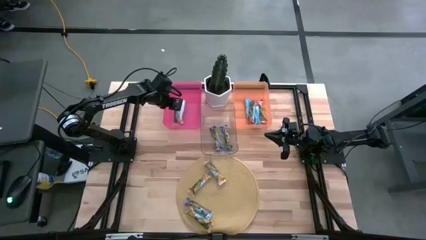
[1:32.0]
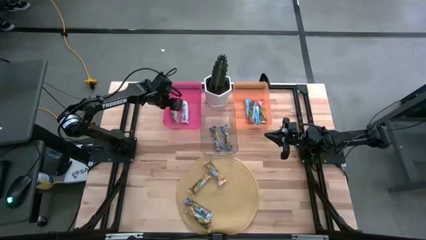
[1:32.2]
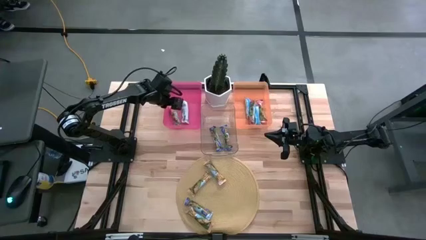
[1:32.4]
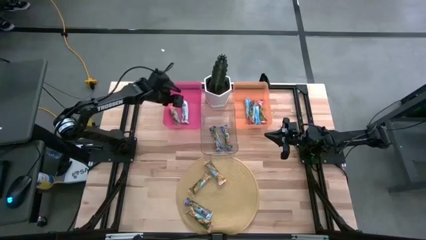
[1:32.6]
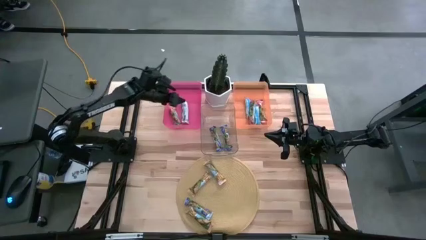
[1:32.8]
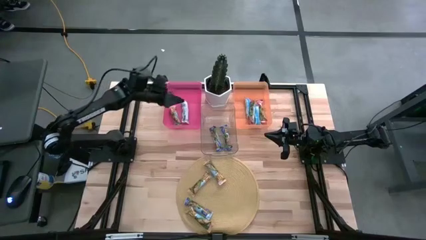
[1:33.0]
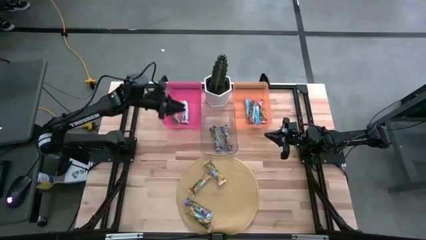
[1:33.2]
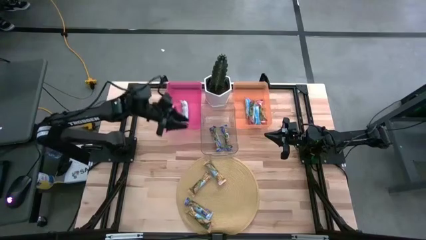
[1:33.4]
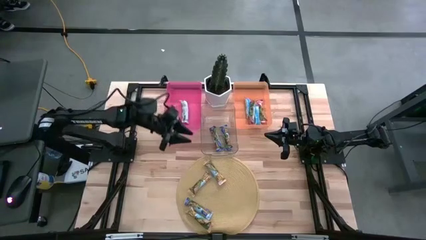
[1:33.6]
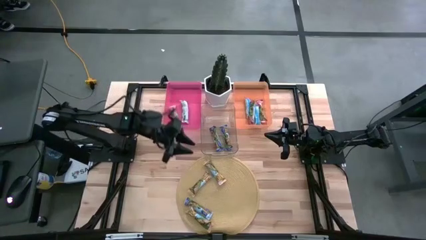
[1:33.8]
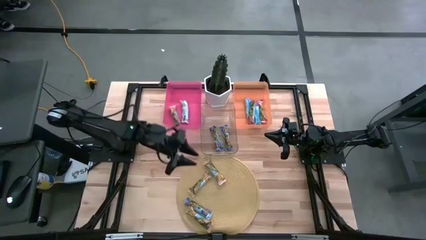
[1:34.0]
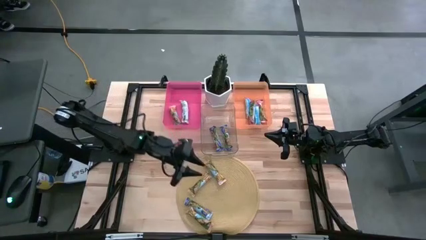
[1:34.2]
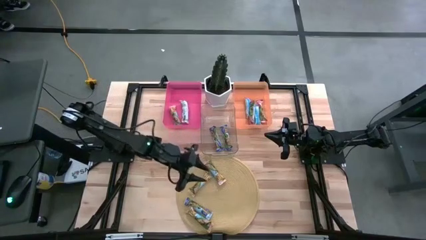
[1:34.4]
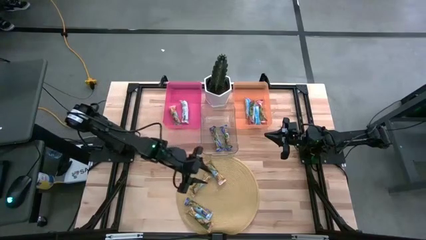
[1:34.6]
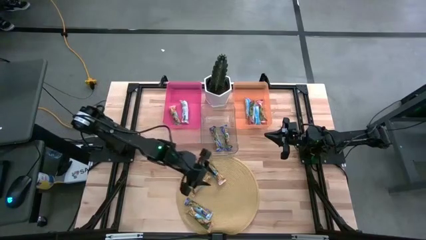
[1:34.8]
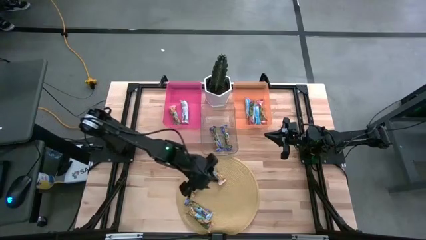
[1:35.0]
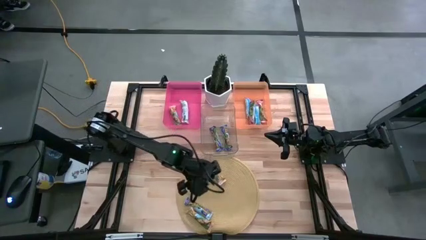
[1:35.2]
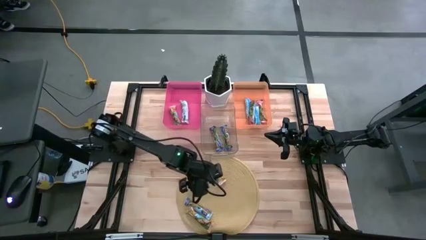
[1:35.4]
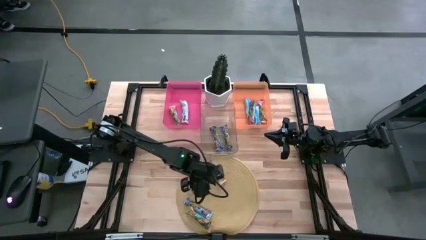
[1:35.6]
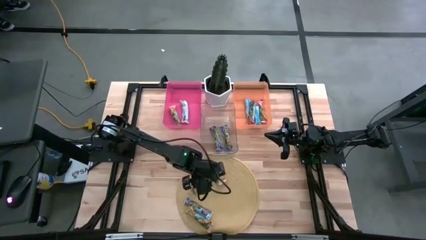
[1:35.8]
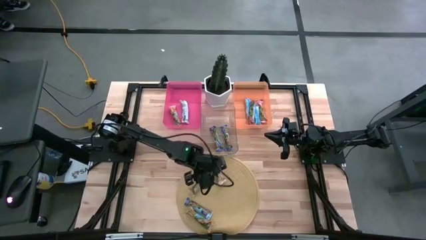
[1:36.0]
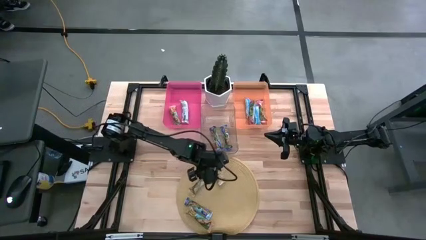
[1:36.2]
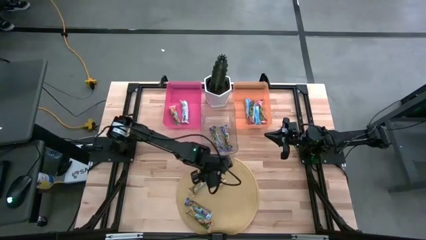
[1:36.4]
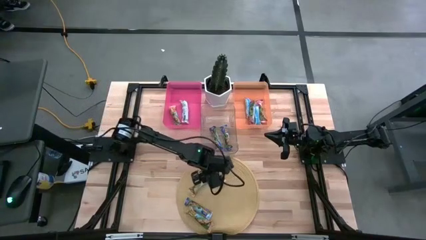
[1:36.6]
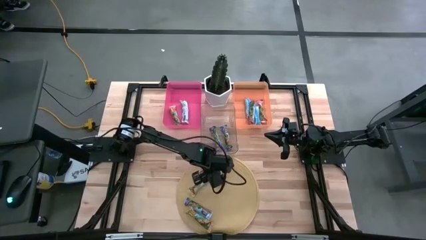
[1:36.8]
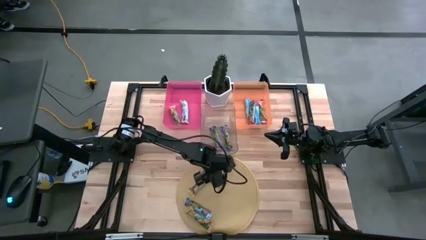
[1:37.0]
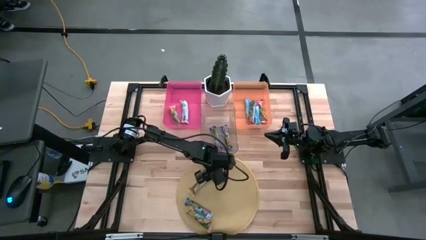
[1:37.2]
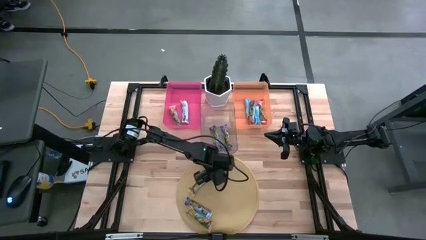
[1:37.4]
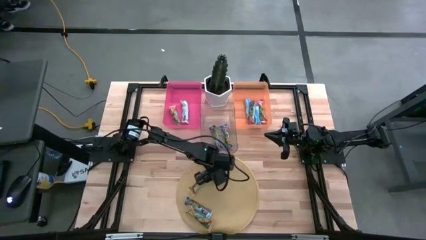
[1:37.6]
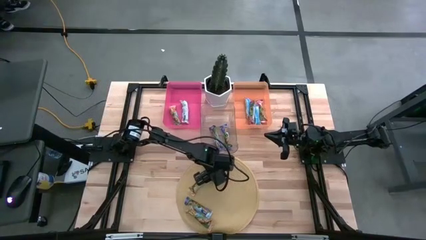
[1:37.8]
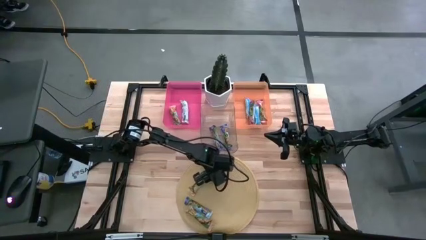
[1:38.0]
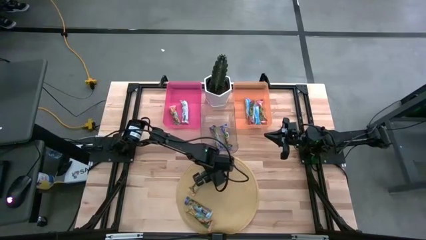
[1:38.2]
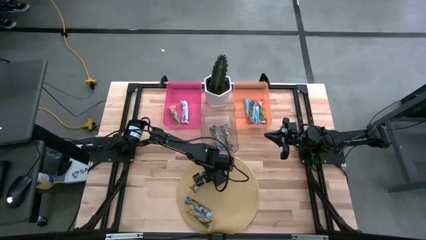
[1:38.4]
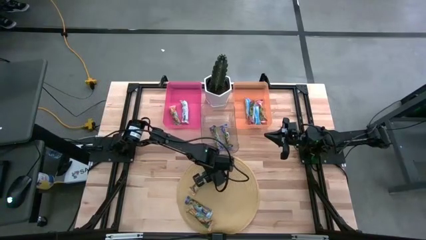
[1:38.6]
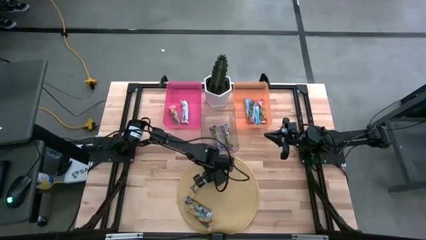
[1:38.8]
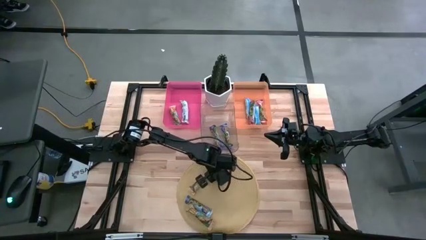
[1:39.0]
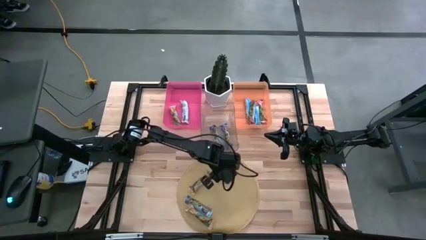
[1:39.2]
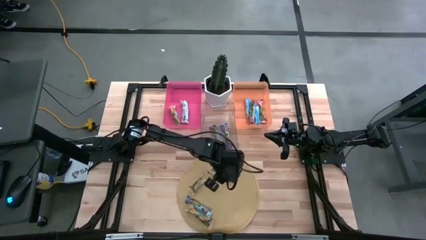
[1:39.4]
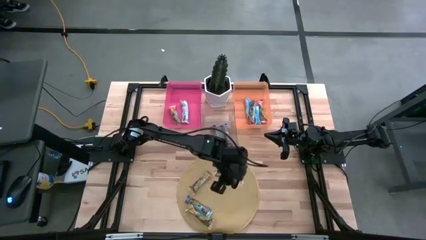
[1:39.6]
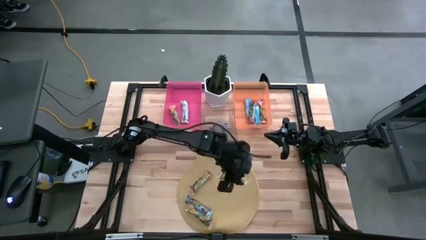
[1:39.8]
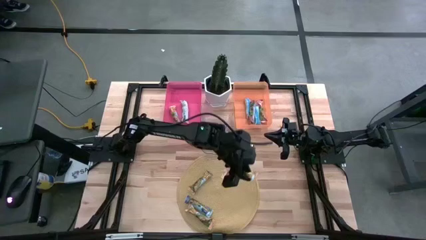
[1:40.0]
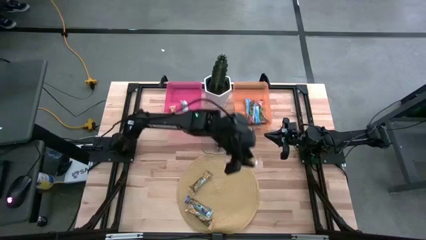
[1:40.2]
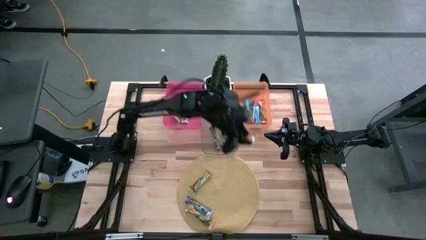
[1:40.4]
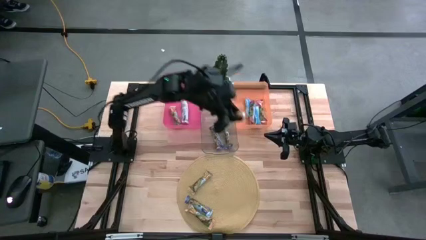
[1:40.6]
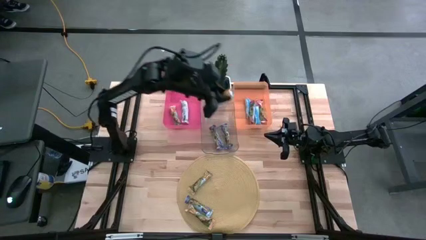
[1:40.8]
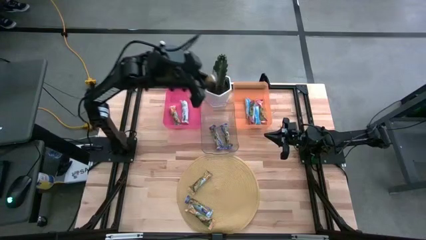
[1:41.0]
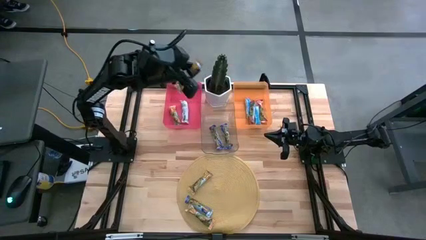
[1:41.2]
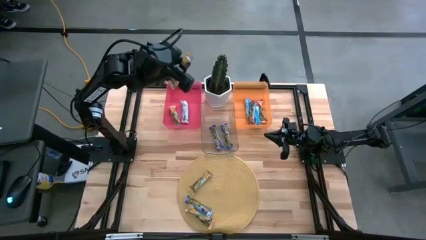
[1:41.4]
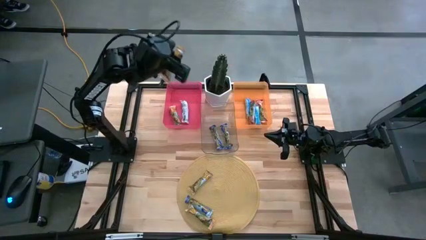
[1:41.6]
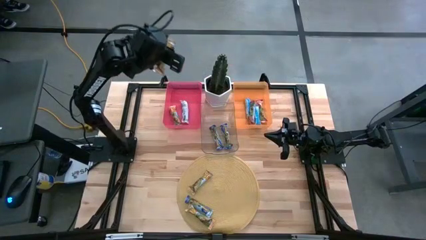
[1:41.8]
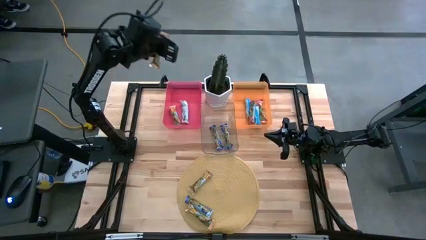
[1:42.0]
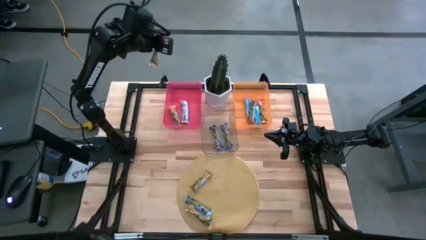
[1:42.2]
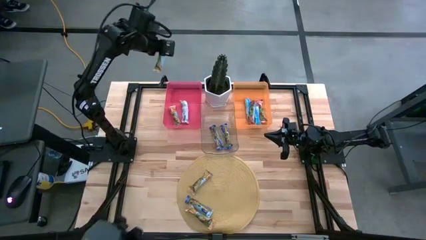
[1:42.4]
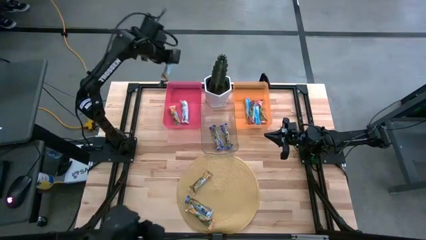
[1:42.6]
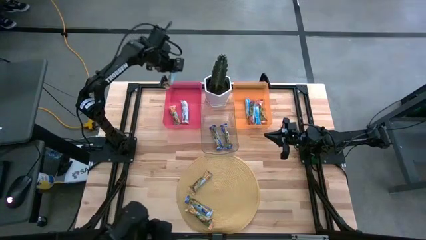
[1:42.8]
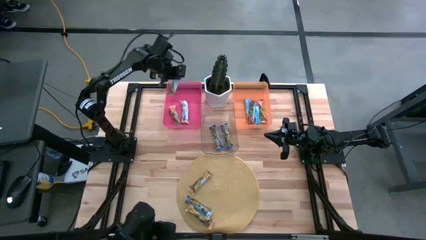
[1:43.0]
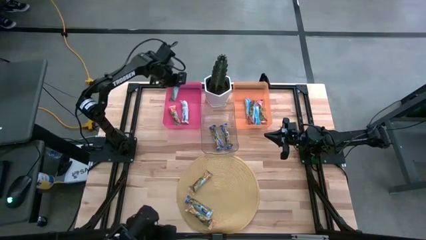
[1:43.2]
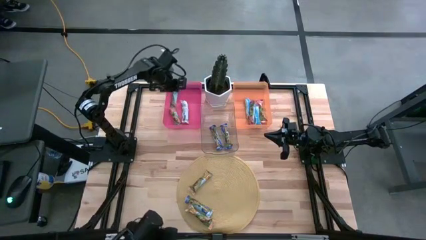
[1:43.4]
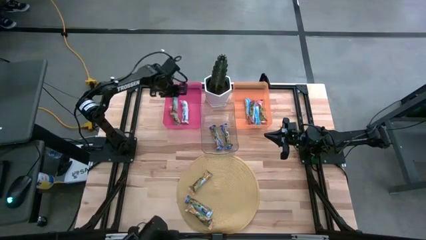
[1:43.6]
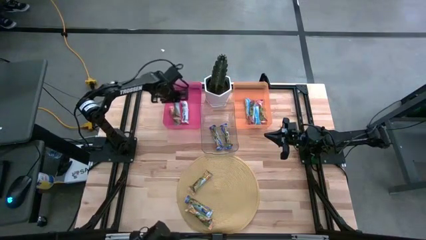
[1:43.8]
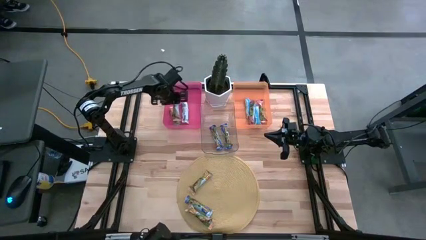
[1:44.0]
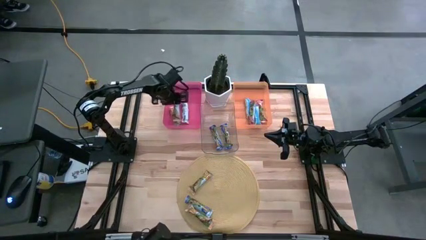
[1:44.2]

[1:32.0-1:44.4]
Task: Pick and place Granola Bars by type
Put the yellow granola bar into the pink bin

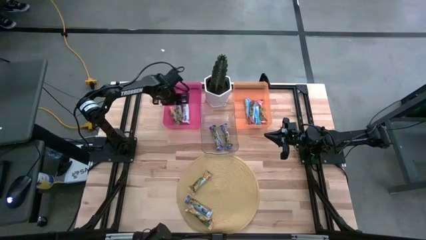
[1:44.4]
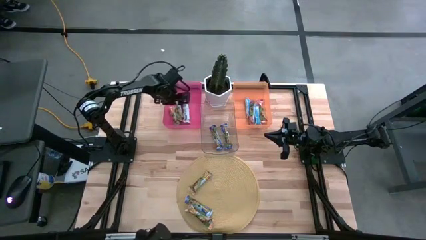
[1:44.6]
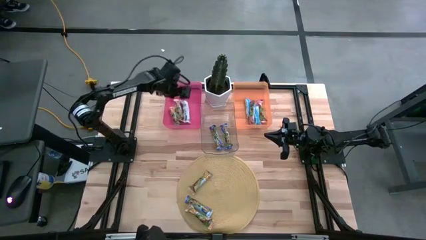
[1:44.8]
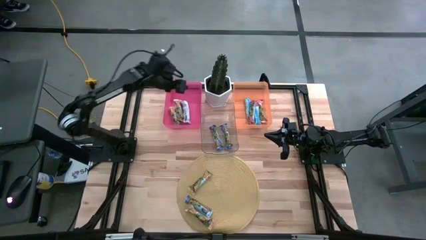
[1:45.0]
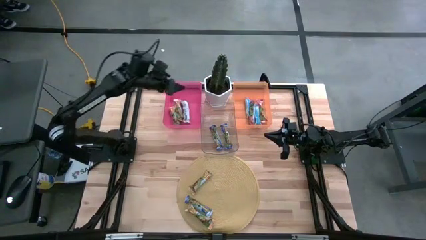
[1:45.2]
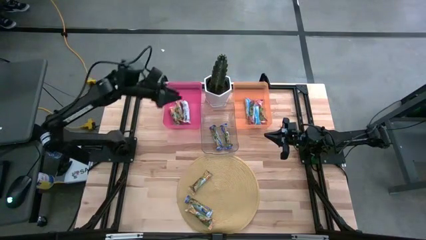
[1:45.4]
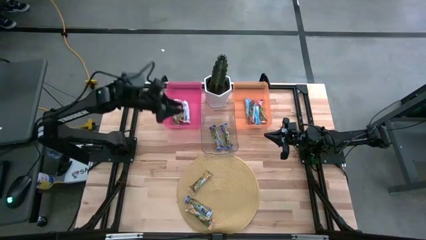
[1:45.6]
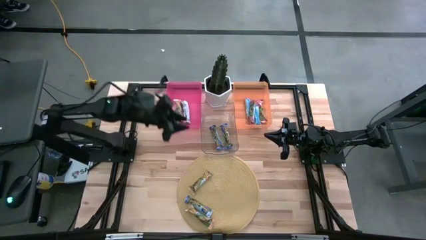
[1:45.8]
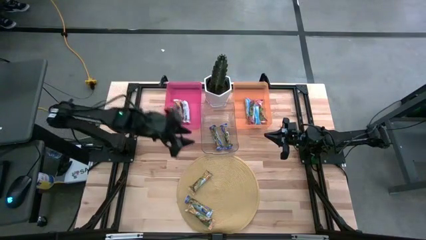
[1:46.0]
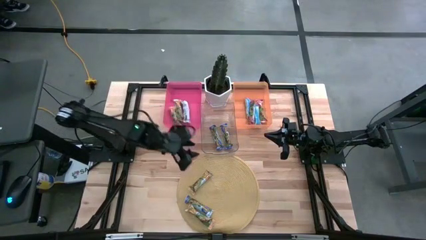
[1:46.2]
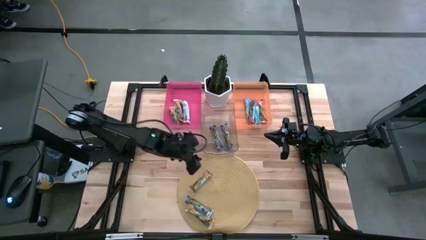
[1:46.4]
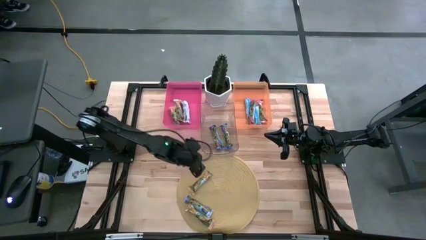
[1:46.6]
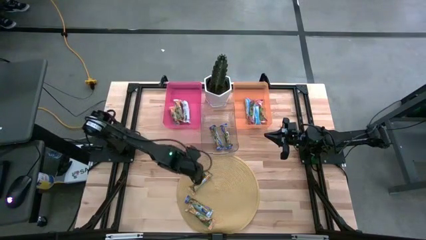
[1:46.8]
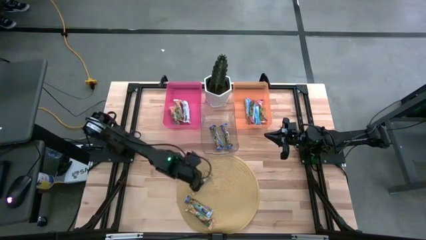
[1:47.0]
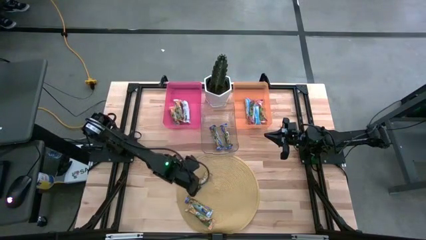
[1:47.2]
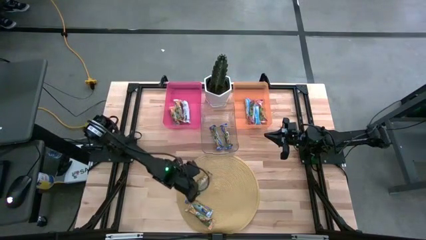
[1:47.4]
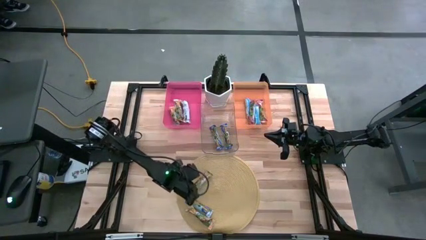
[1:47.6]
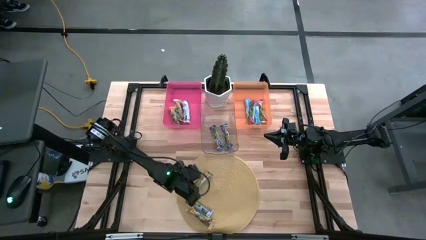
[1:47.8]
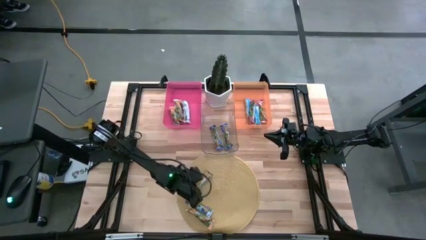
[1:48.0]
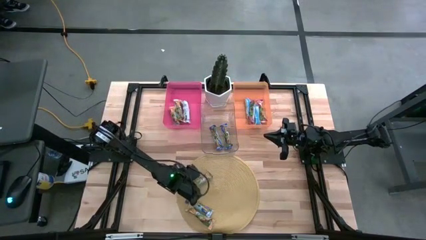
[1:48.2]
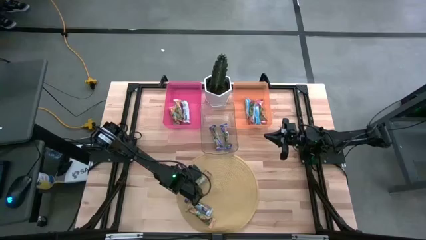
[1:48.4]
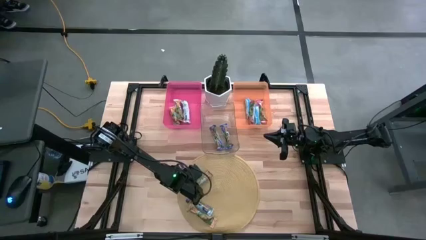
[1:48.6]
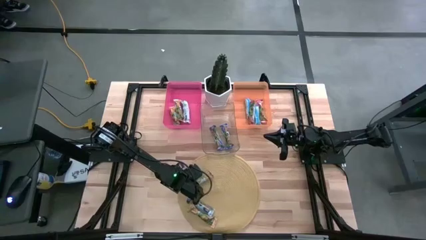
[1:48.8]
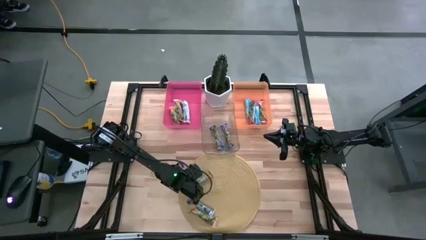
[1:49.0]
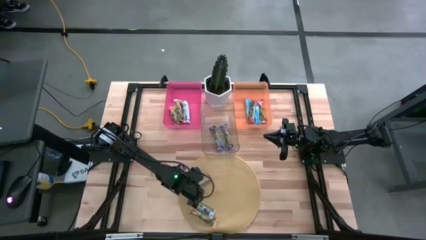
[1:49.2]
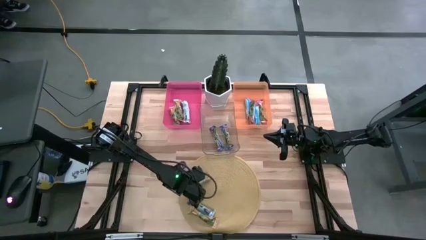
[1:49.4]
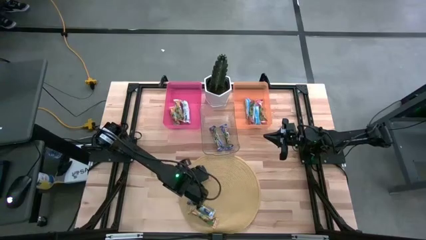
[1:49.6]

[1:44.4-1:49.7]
Put the yellow granola bar into the pink bin
